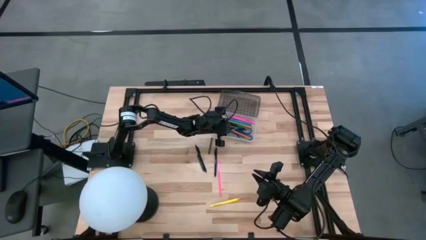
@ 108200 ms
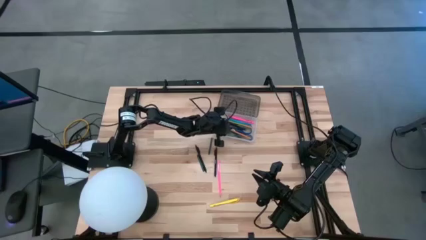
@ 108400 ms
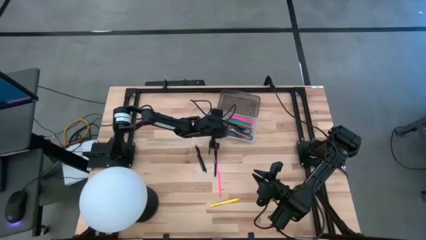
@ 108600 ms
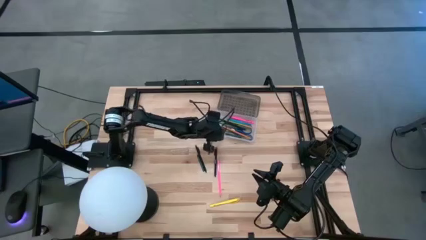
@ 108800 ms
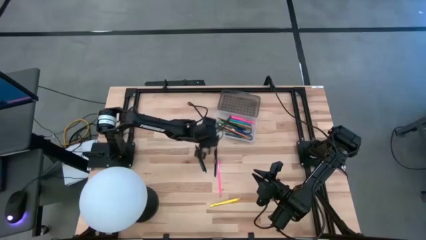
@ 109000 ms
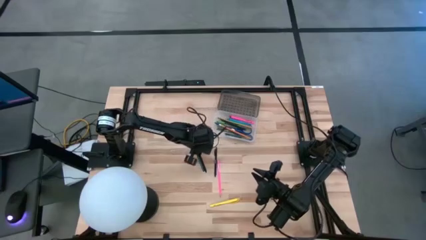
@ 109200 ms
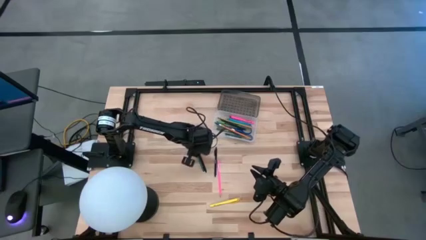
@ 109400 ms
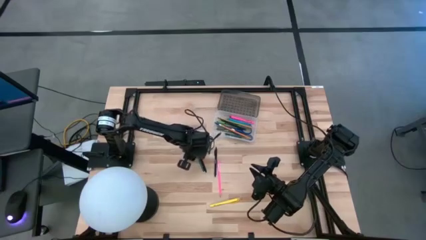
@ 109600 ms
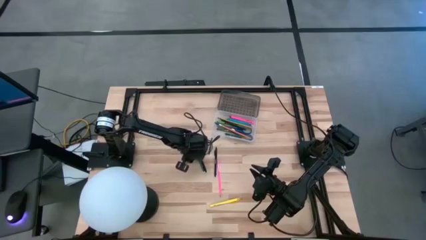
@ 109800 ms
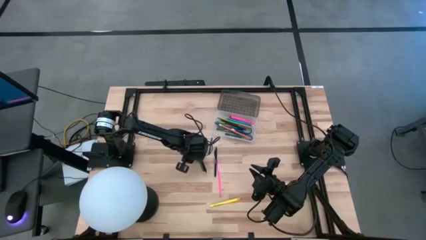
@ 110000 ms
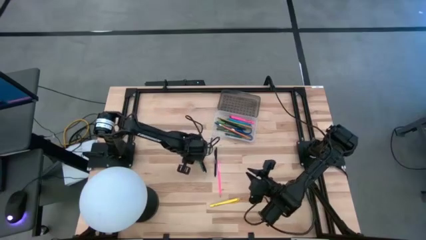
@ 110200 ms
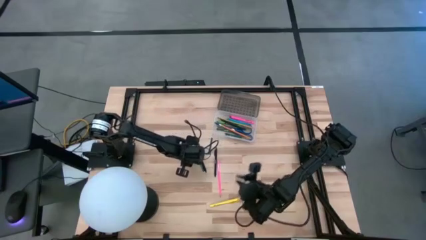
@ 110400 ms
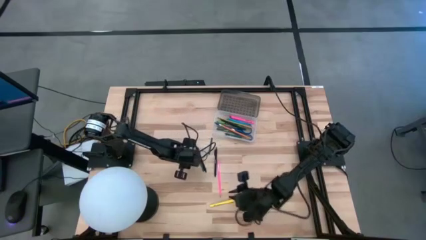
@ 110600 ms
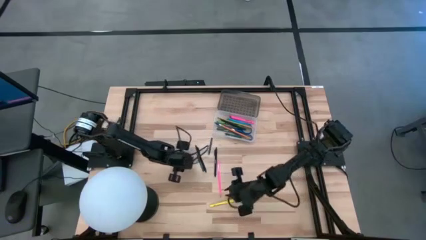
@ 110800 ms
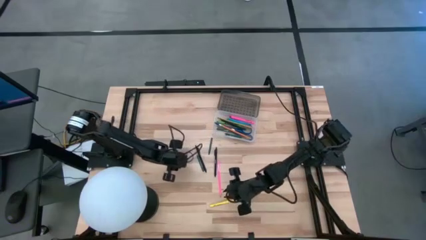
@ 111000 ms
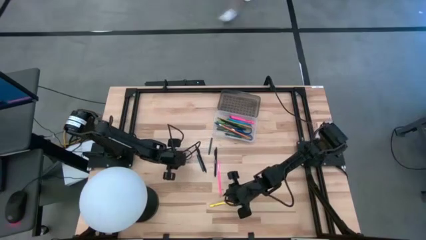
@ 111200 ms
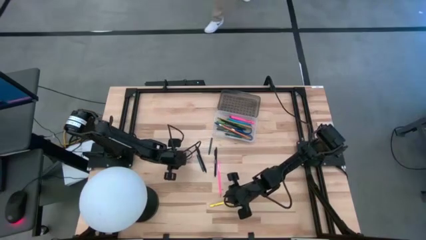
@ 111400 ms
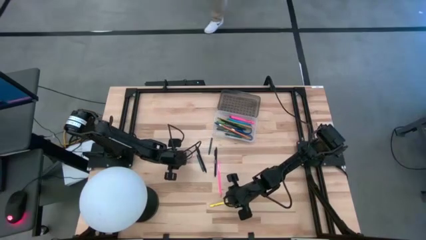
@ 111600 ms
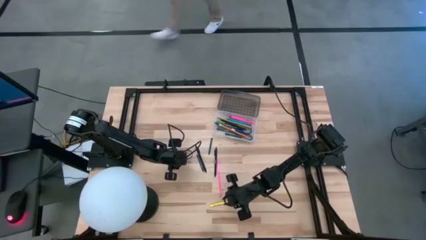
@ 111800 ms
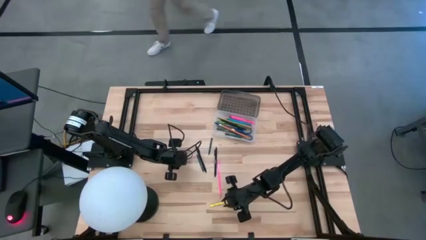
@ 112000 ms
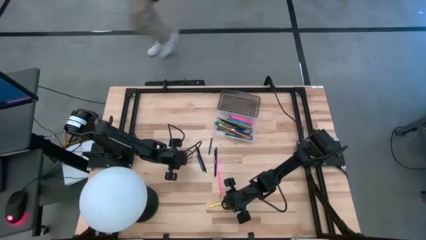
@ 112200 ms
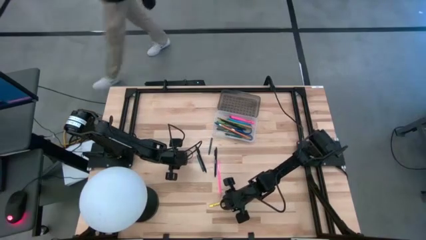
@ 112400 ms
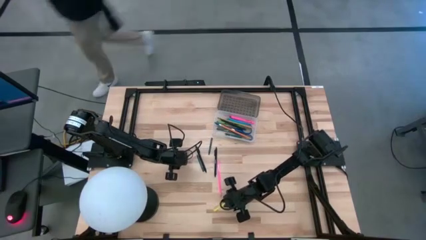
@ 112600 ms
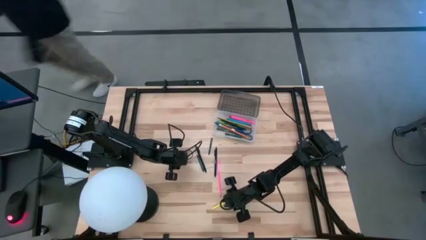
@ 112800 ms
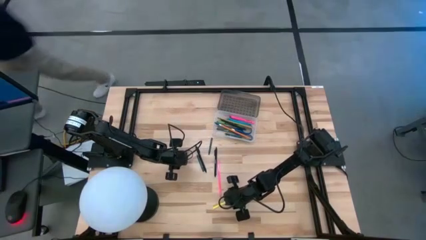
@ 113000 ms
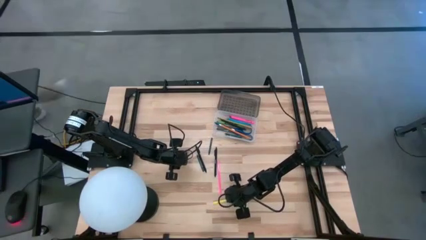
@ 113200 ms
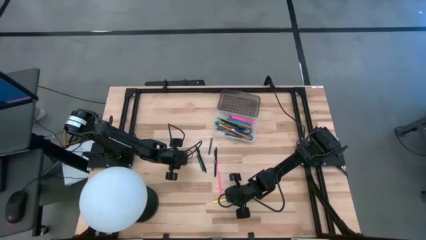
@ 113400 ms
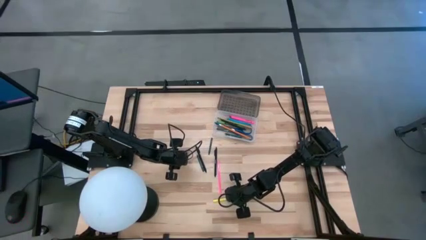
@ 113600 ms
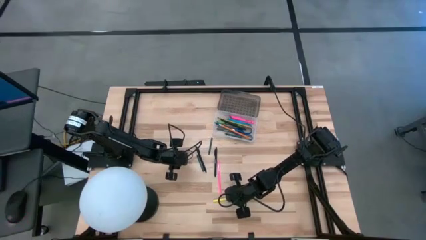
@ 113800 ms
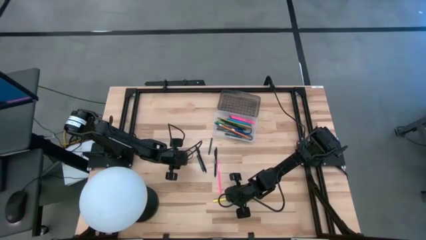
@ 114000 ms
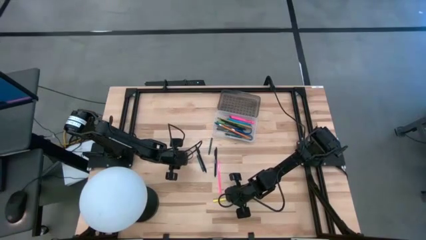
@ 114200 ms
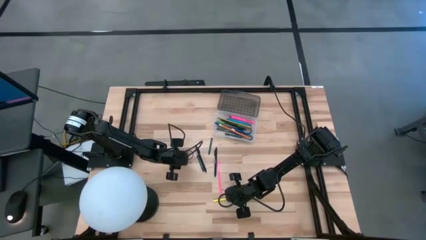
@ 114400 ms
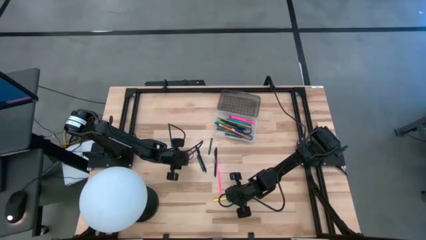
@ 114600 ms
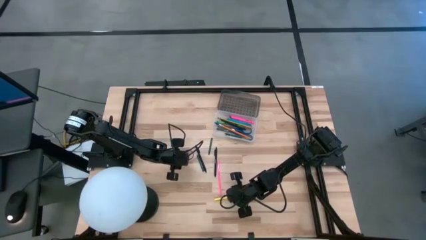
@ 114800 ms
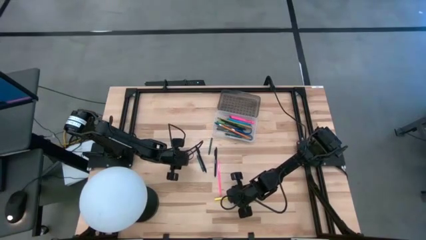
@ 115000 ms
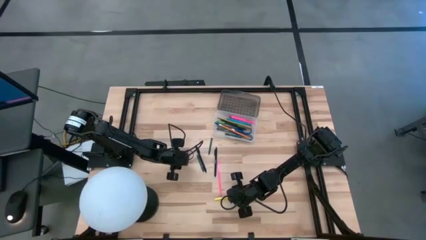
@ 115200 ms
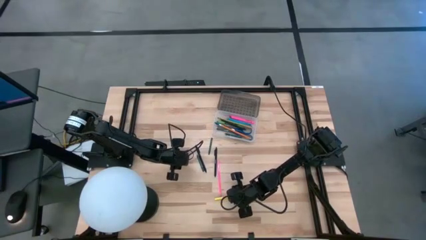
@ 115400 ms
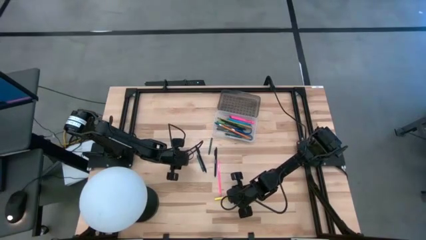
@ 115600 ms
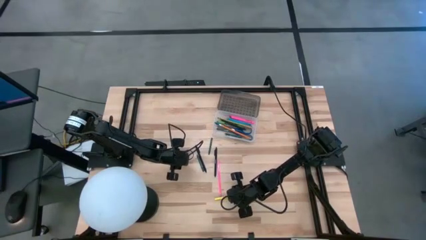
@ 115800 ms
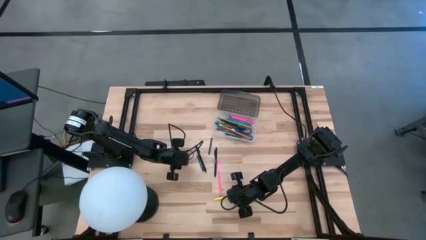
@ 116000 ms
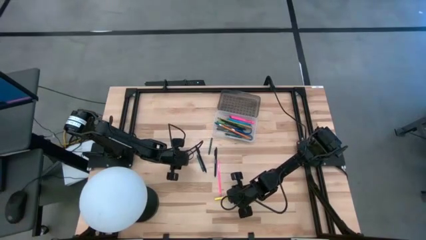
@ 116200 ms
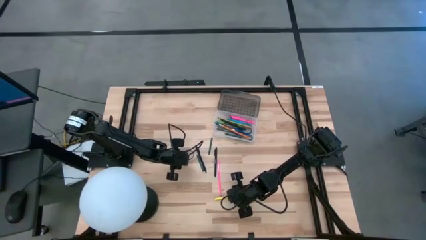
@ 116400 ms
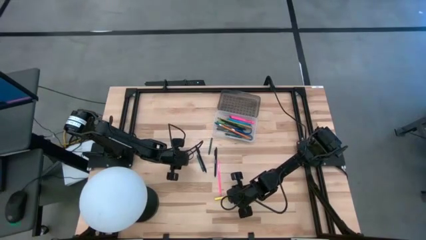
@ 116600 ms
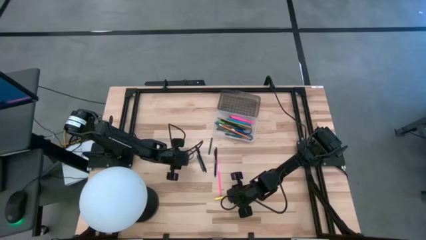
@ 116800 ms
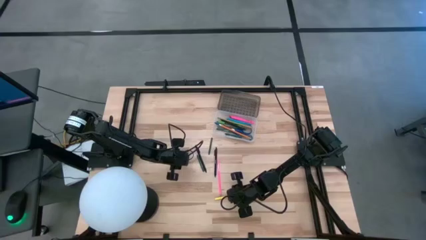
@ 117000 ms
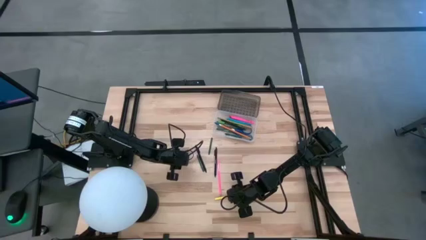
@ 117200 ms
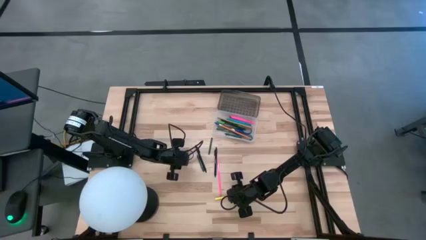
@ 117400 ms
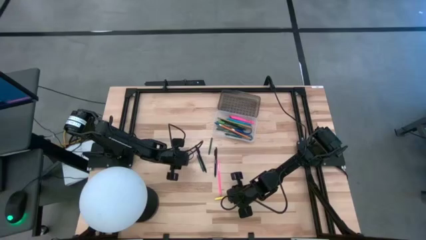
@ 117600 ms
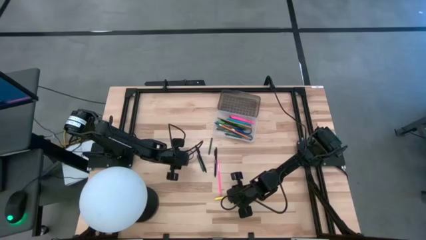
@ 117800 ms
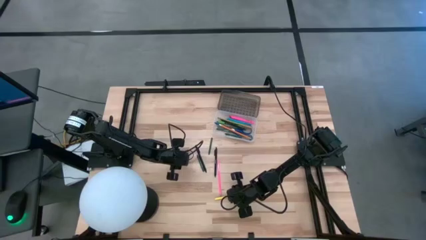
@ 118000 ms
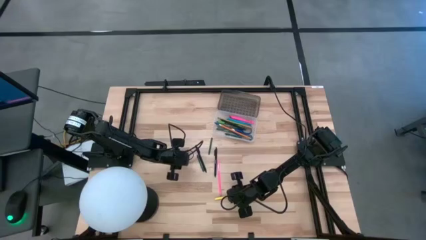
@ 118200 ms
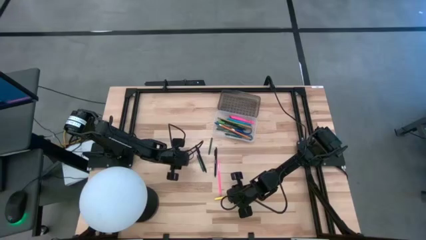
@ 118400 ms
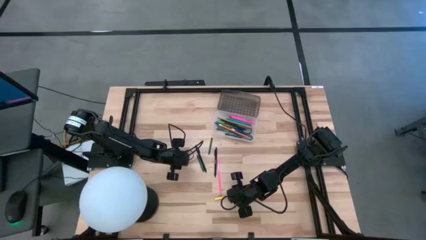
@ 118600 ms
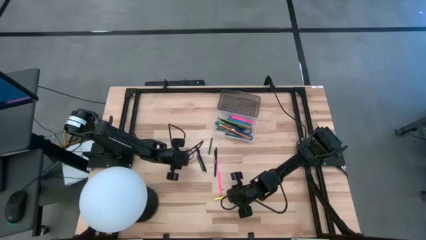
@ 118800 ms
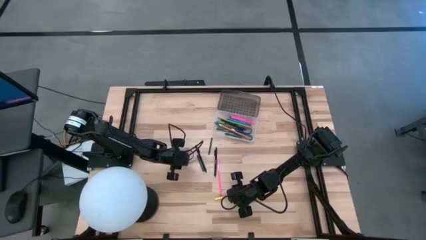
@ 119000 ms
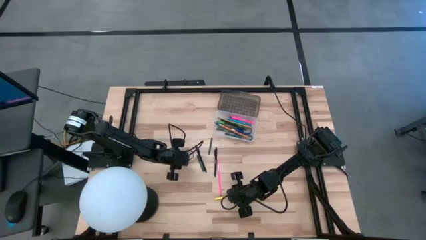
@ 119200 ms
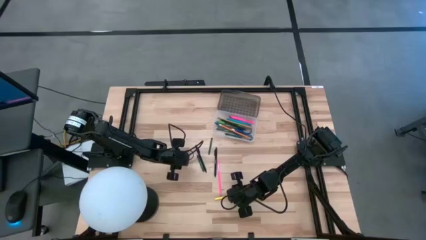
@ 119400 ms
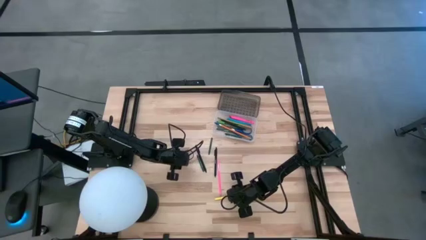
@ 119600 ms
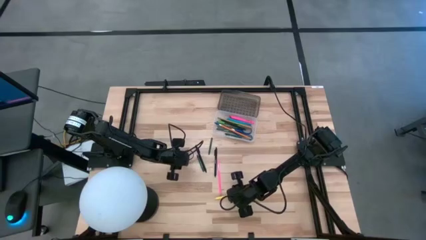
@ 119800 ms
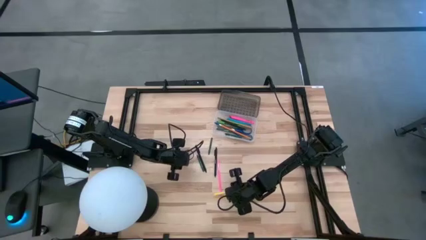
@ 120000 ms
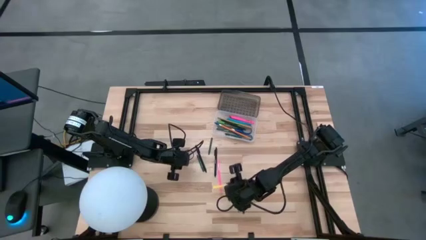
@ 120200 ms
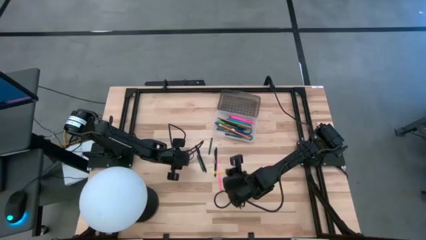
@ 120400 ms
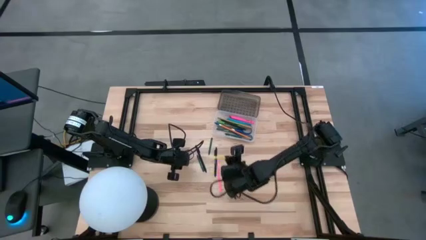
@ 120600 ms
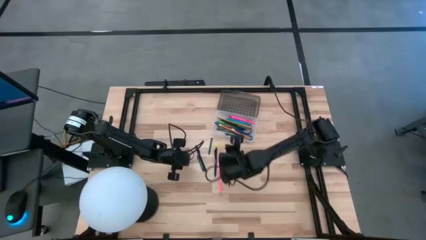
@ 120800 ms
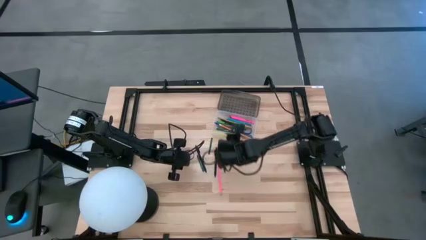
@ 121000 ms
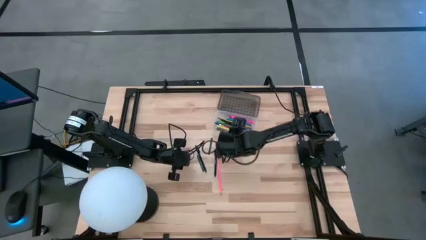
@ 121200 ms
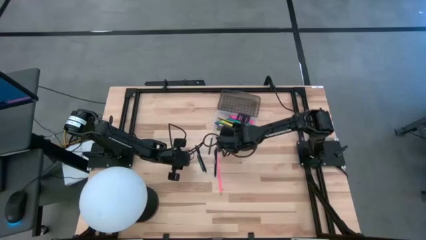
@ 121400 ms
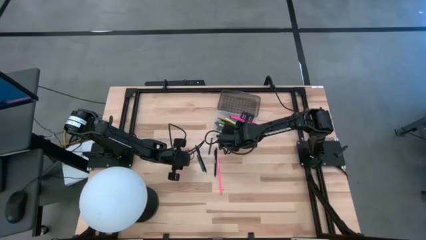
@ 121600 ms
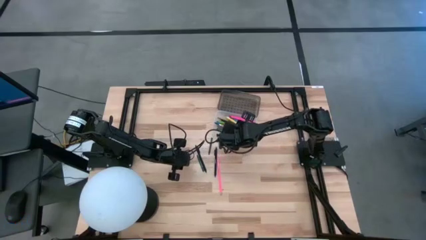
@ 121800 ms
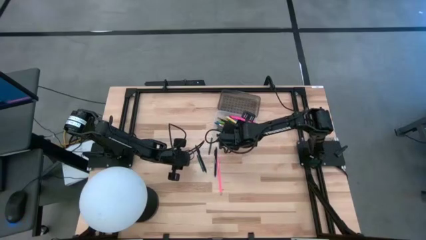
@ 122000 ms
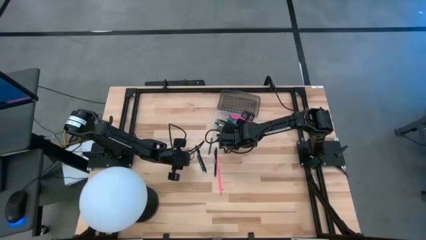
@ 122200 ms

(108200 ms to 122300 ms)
Task: Pick & place school supplies into a supply box
Put the yellow pen into the black supply box

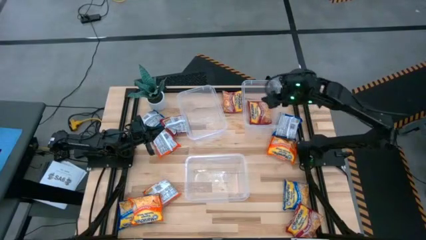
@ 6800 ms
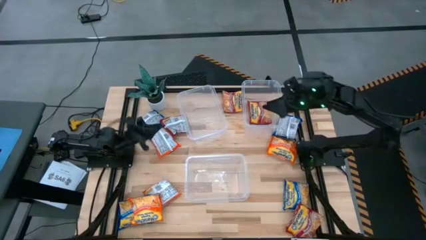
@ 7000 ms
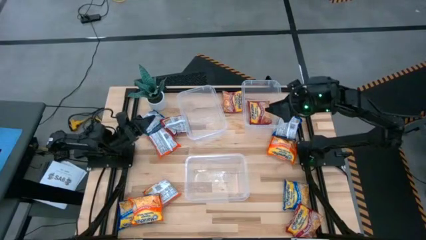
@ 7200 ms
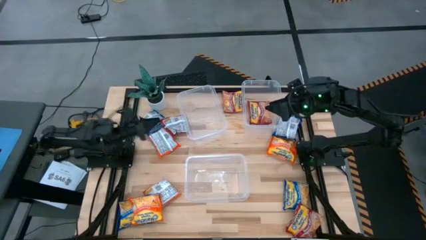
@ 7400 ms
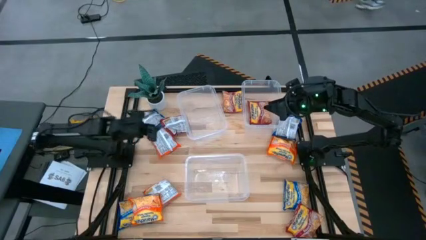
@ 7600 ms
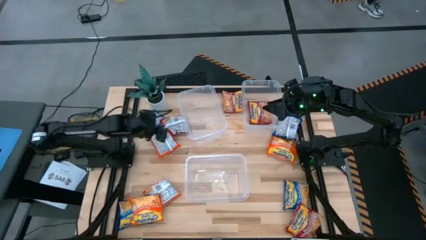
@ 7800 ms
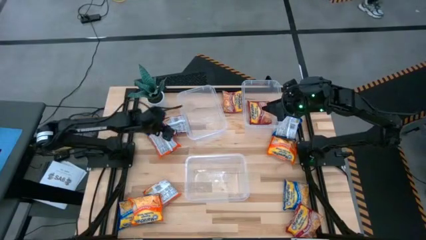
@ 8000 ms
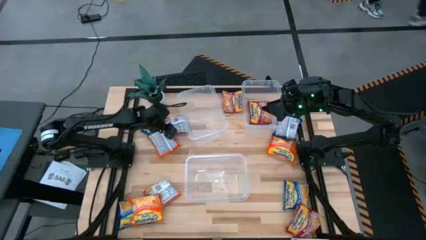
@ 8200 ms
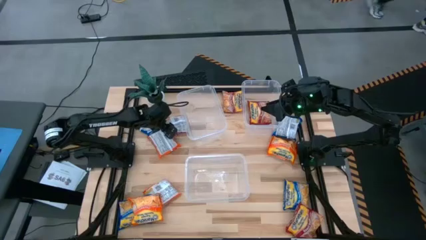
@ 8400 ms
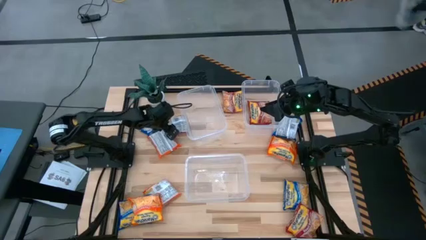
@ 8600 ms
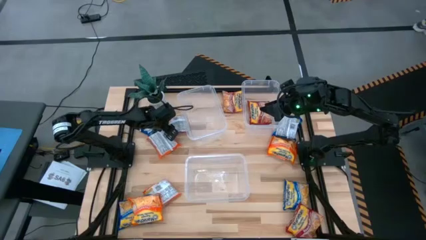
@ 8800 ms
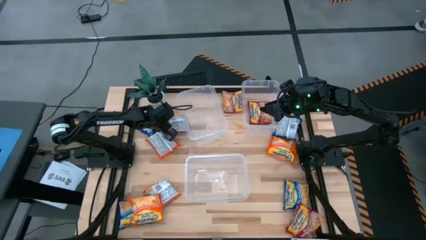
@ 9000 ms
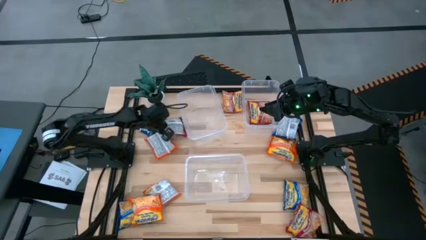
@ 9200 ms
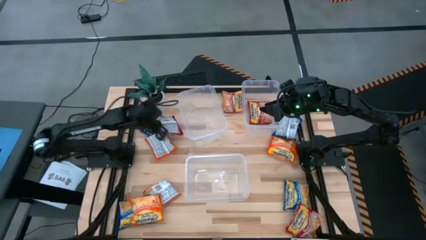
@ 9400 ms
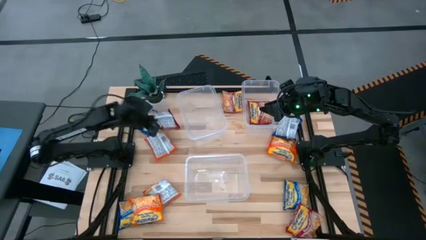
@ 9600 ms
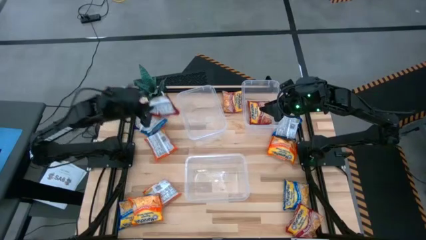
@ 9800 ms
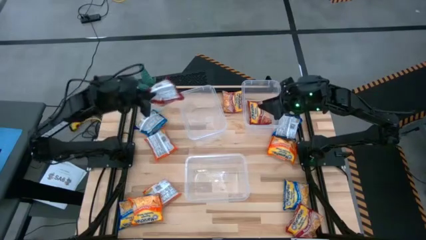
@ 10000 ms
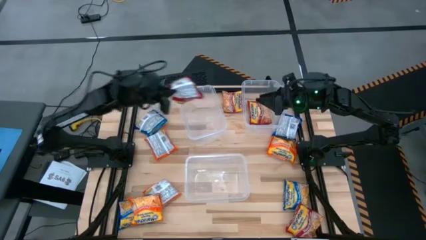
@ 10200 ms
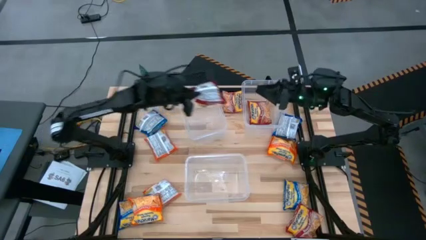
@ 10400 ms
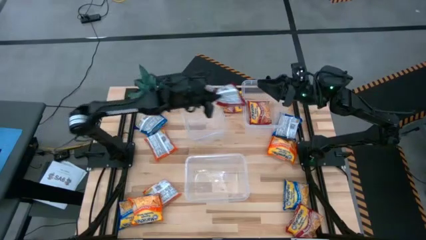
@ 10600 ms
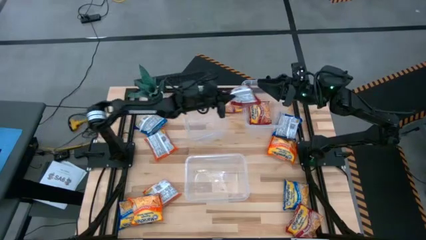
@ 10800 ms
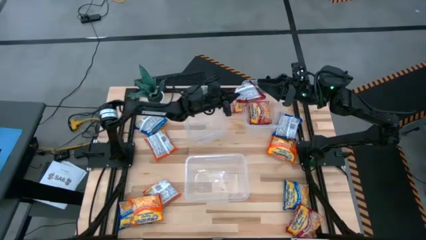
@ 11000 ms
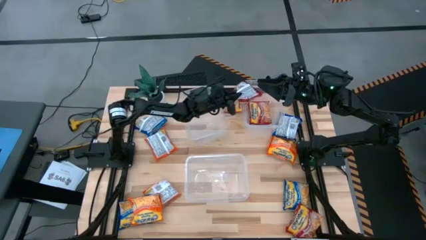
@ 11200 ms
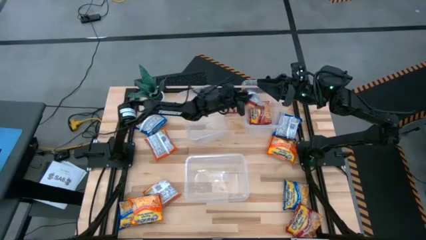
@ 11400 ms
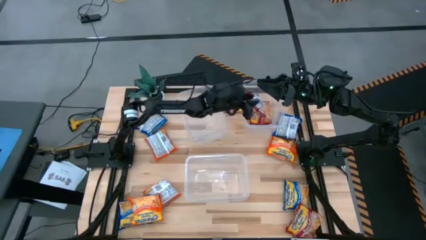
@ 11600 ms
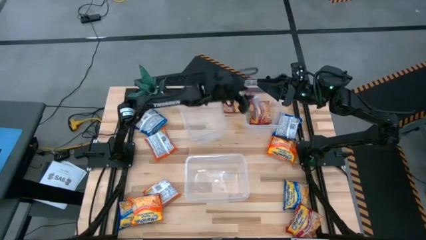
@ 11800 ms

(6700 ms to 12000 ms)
Task: Sort Maruchan noodles
Put the middle left red bag into the top right transparent bin
